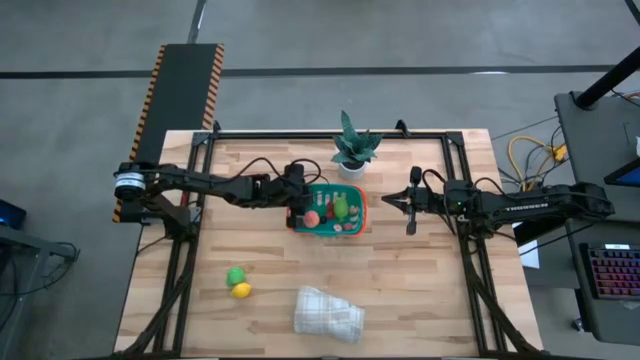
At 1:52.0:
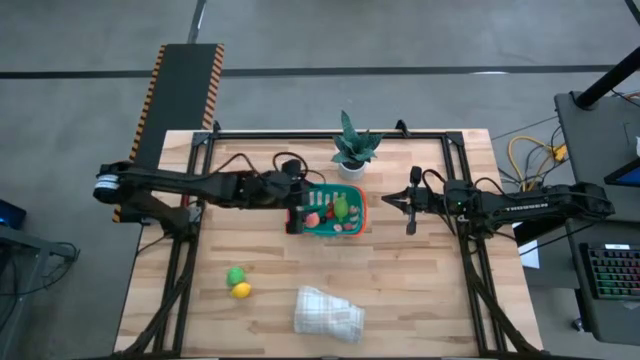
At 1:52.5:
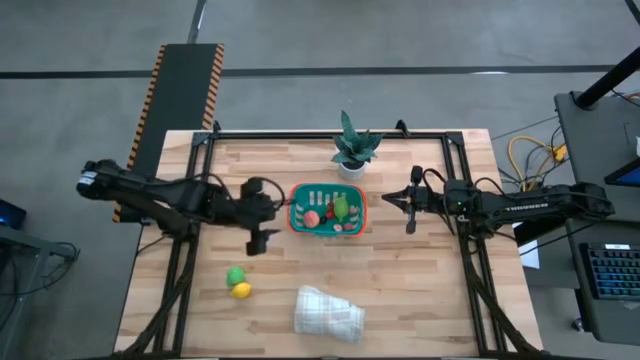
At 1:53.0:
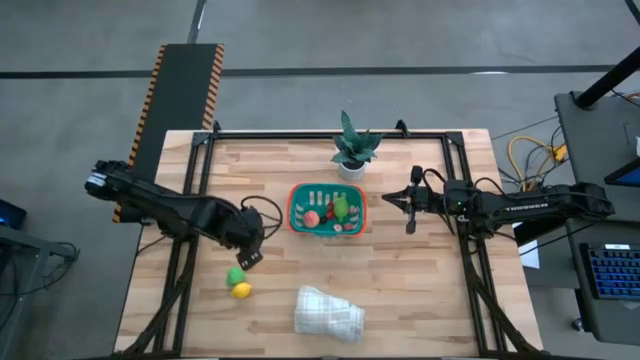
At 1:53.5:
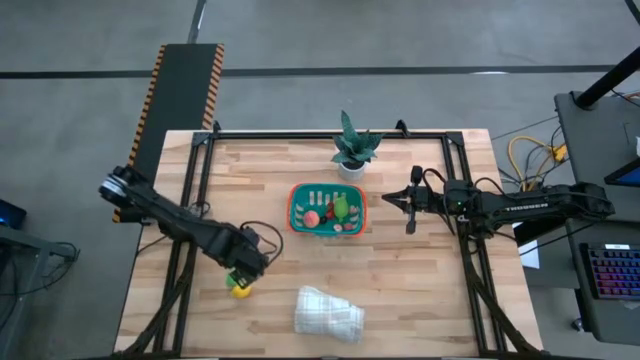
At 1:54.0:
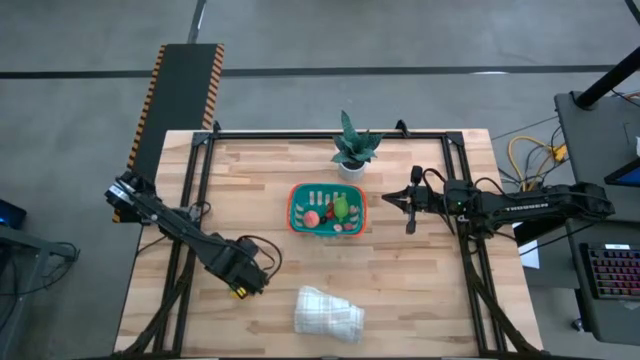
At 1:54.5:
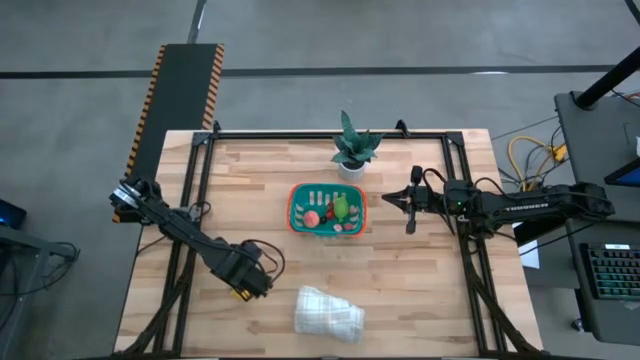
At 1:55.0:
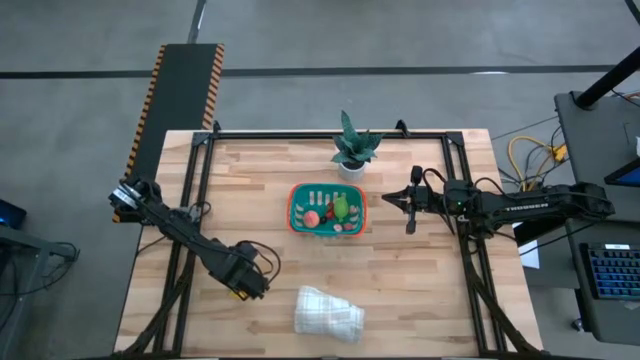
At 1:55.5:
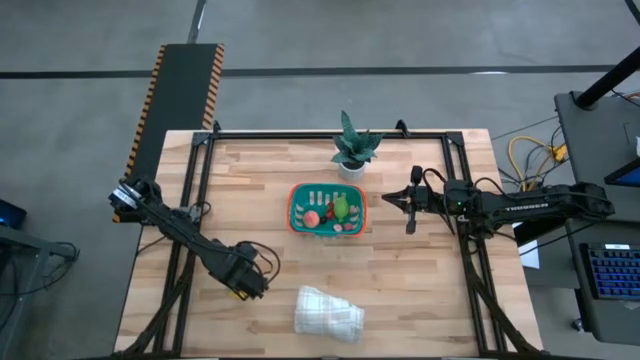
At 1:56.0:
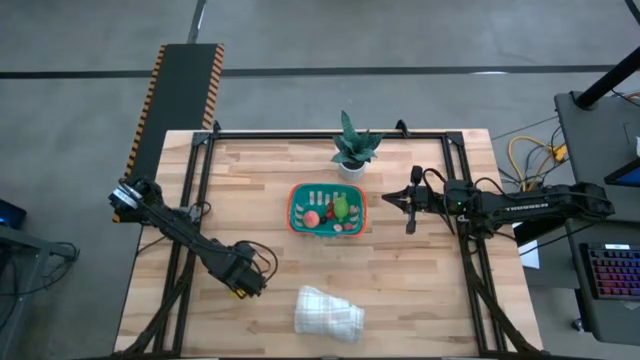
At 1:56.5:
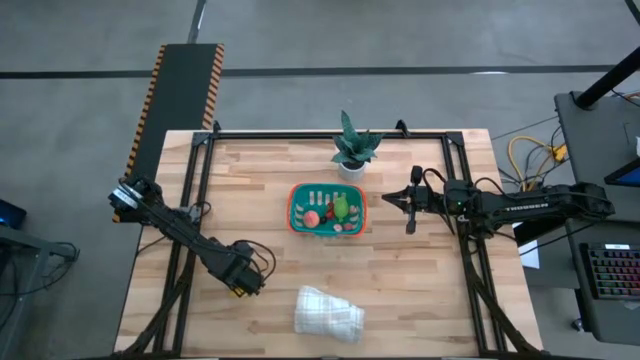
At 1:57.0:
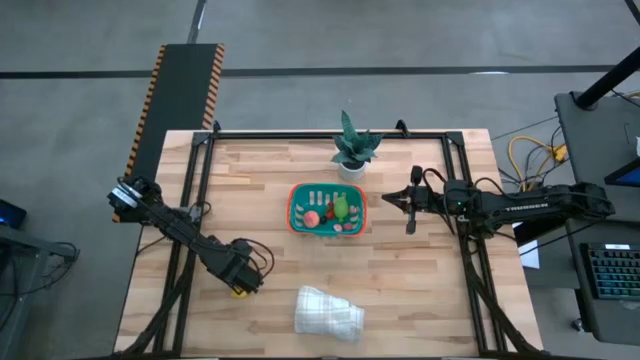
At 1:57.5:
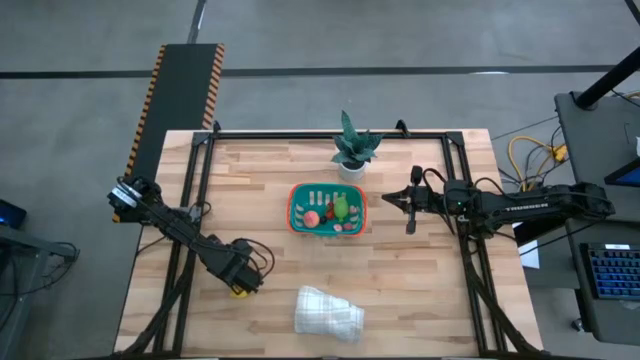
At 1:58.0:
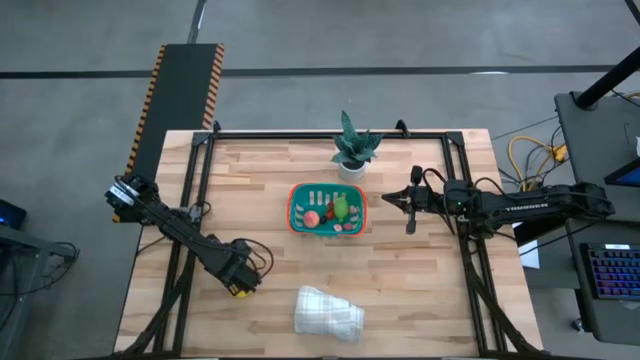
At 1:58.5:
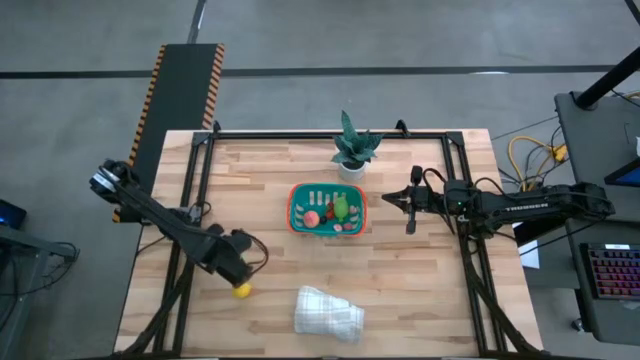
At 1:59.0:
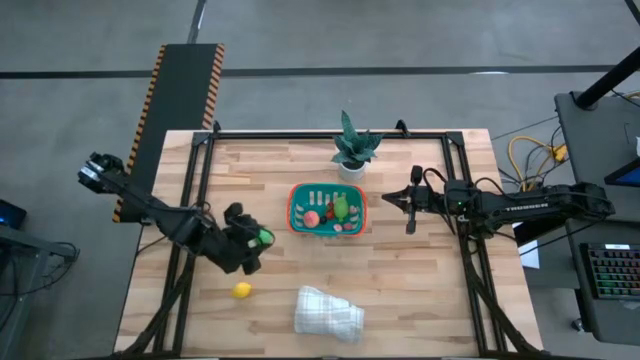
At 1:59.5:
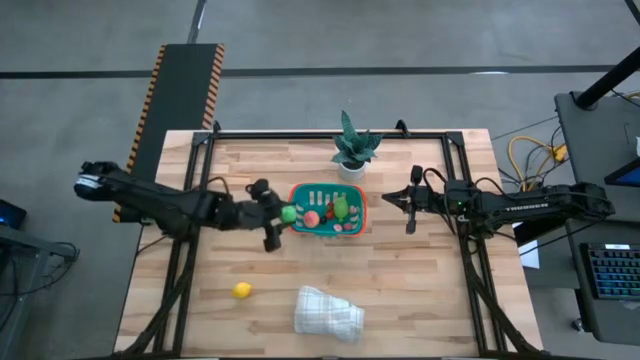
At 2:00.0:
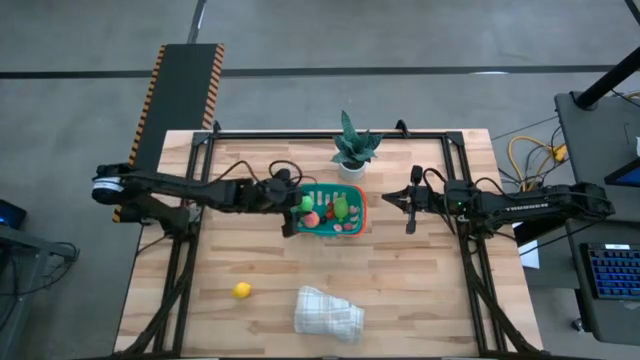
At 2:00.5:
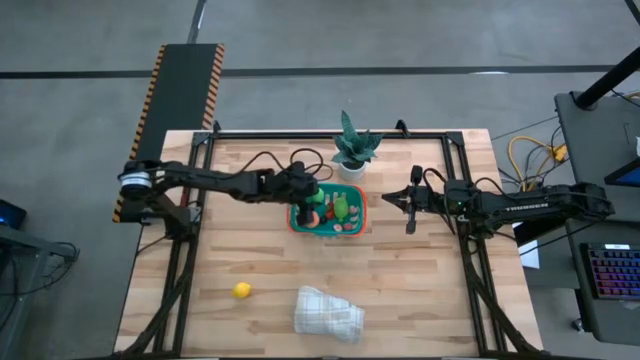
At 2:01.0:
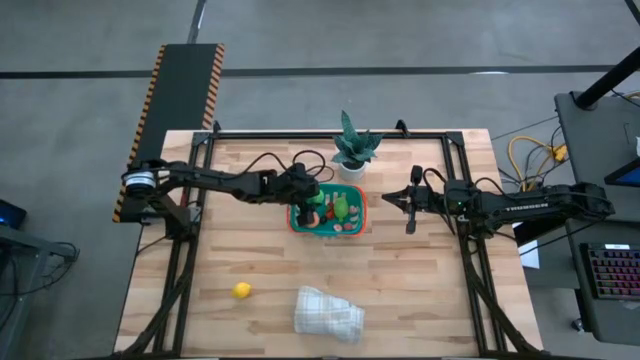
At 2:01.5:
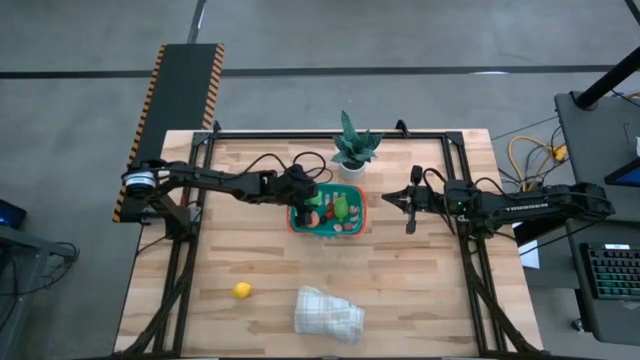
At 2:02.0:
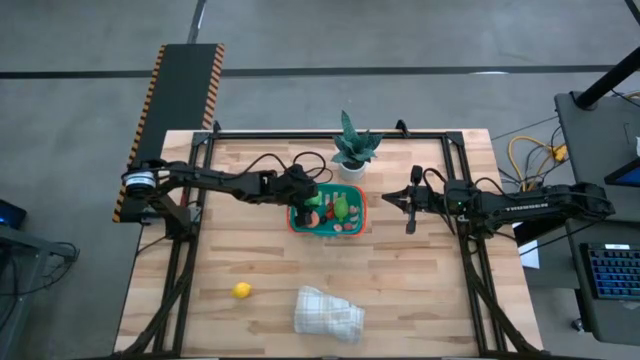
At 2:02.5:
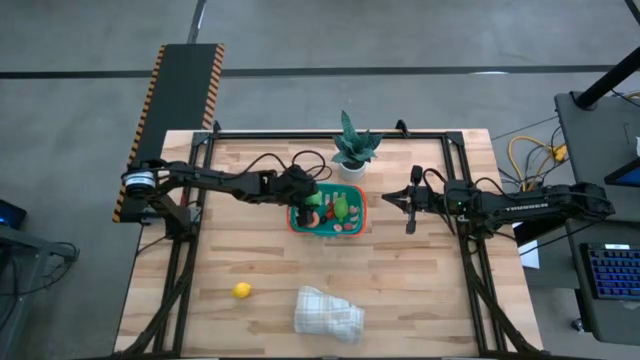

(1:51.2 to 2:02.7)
Task: Build produce basket
Put the green pear into the blue basket

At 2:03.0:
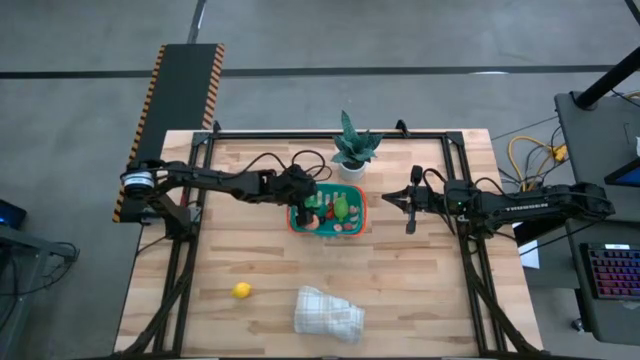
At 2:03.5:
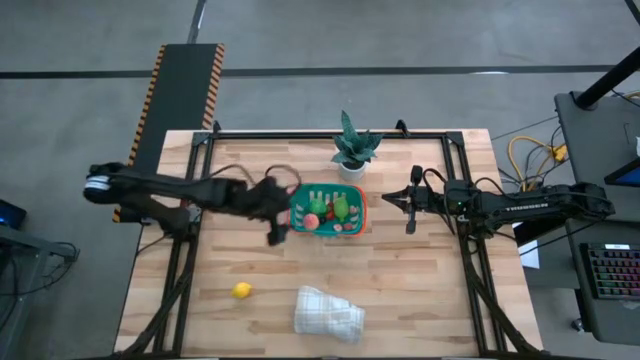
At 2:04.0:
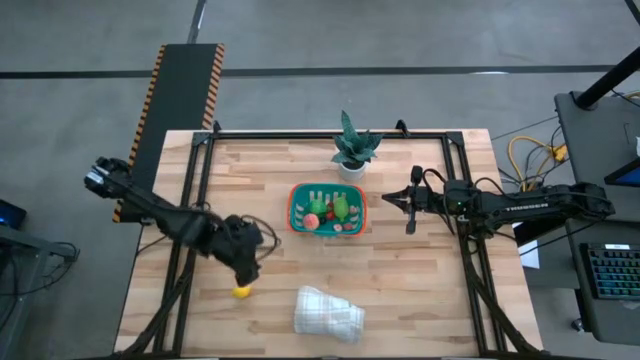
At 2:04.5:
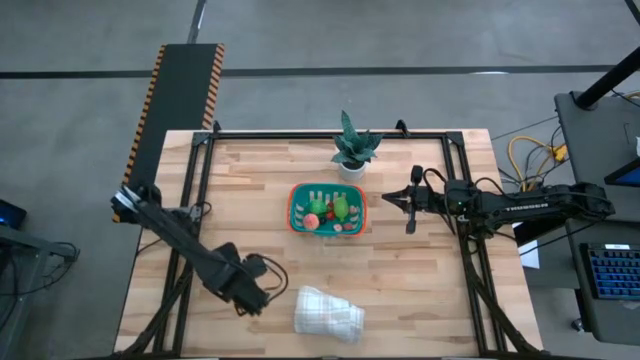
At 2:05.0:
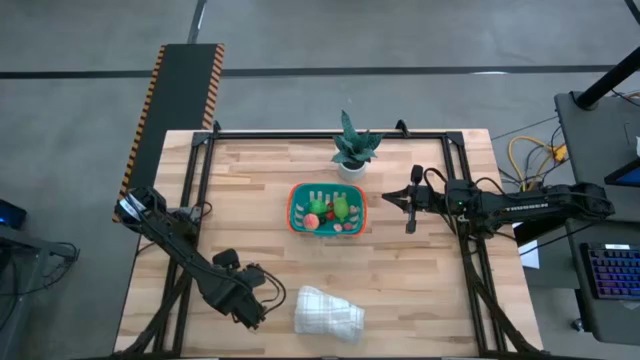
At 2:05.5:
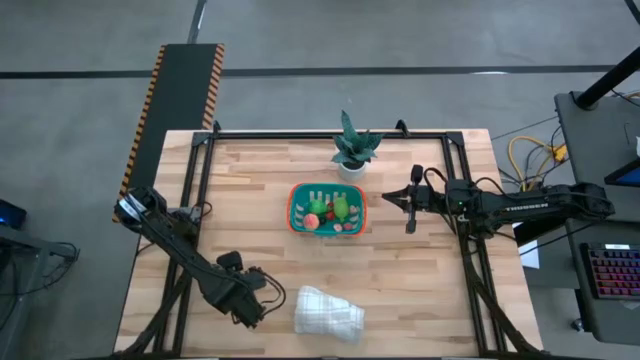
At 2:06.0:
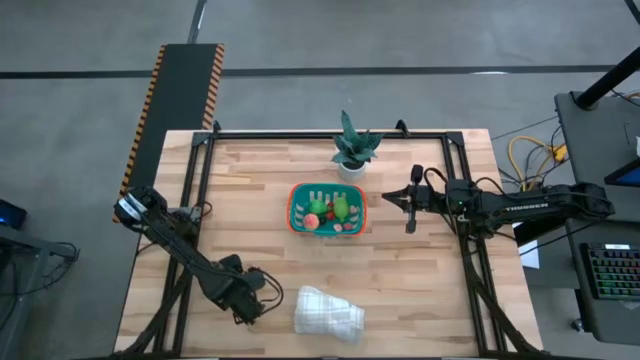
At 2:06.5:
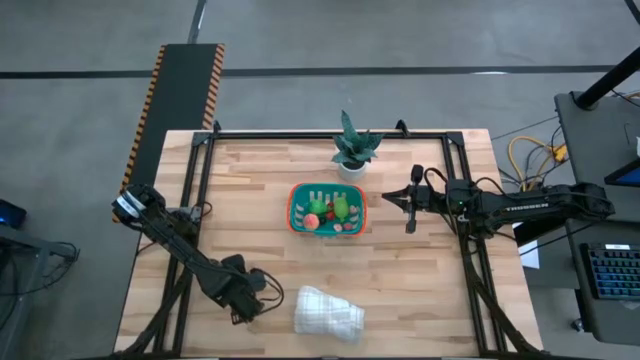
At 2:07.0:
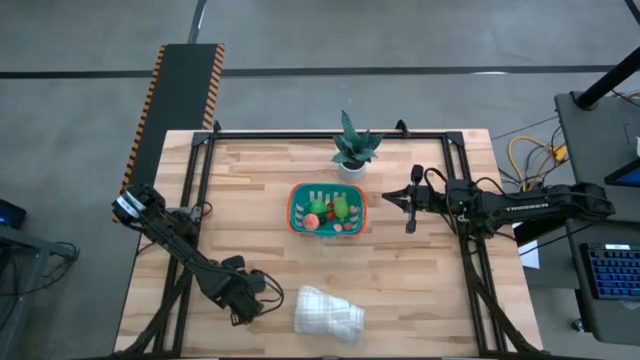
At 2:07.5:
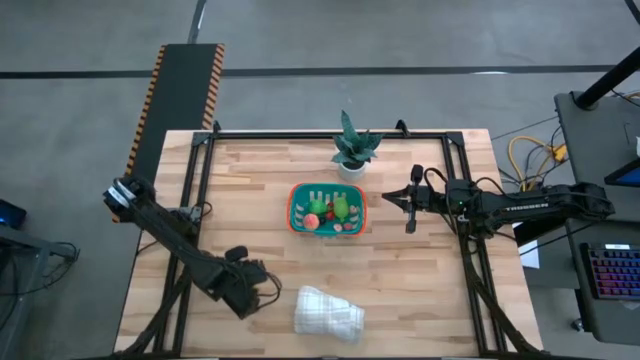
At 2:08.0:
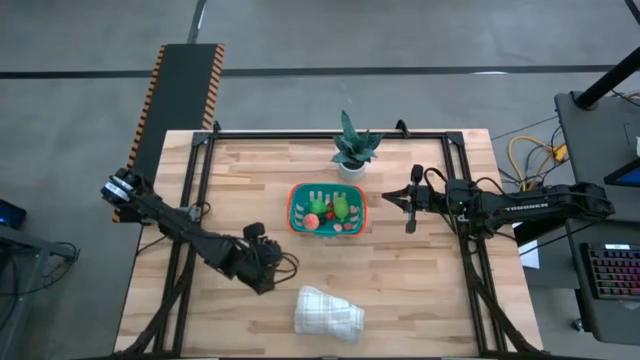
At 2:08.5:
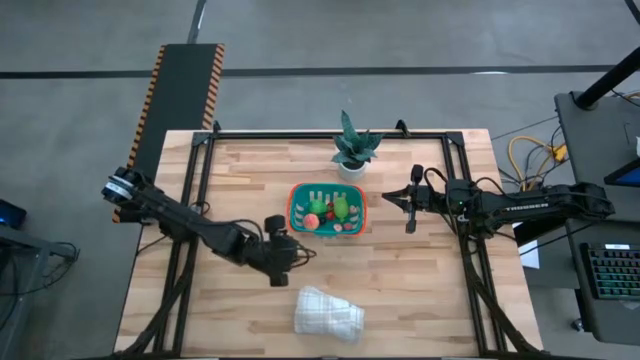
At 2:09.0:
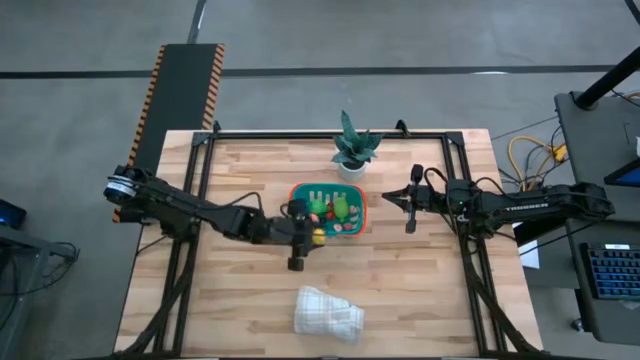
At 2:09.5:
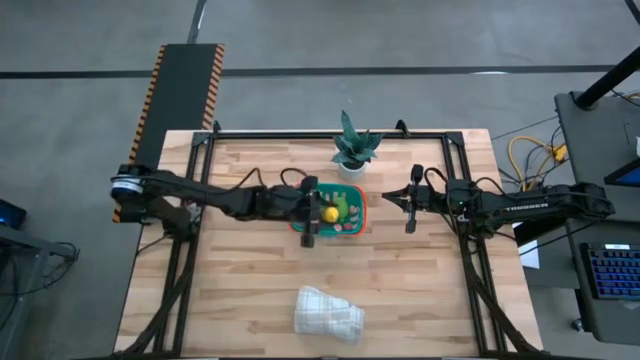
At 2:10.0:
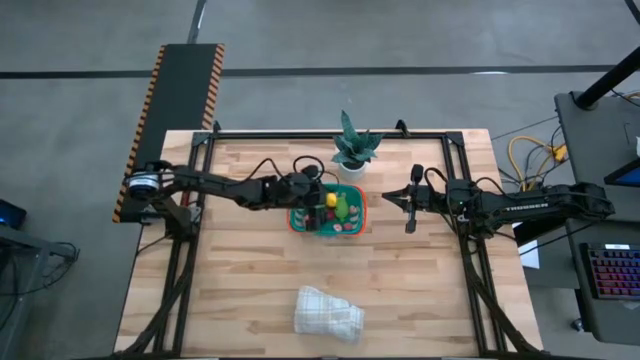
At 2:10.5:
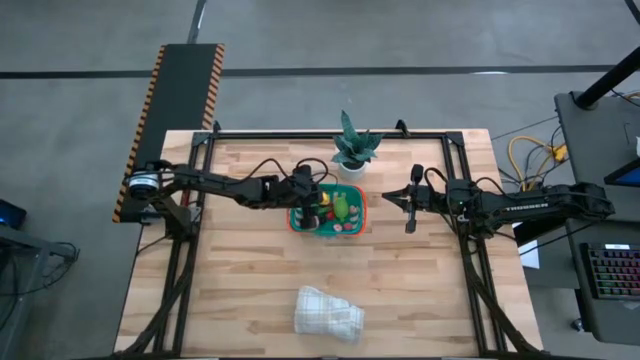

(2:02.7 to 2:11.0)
Put the yellow lemon into the blue basket
